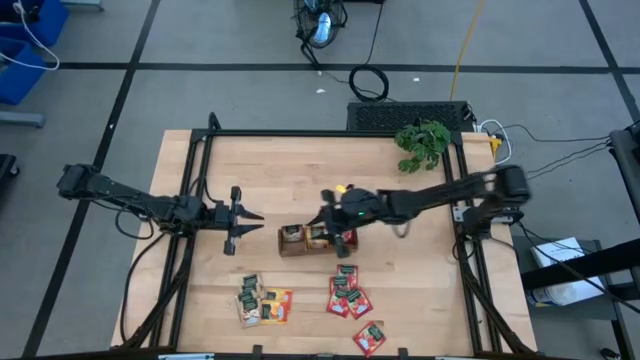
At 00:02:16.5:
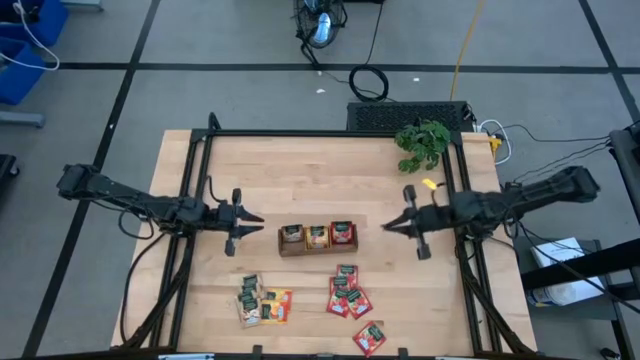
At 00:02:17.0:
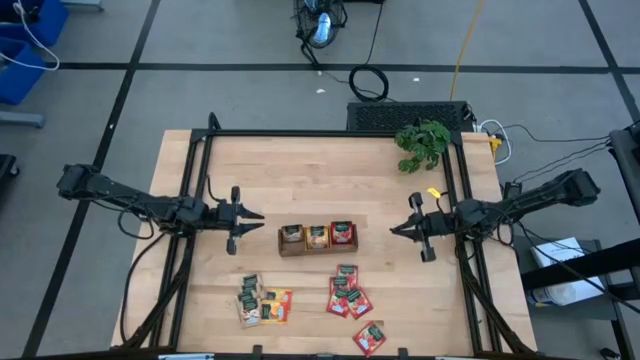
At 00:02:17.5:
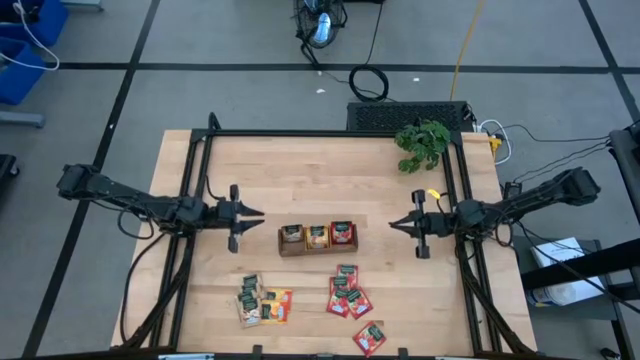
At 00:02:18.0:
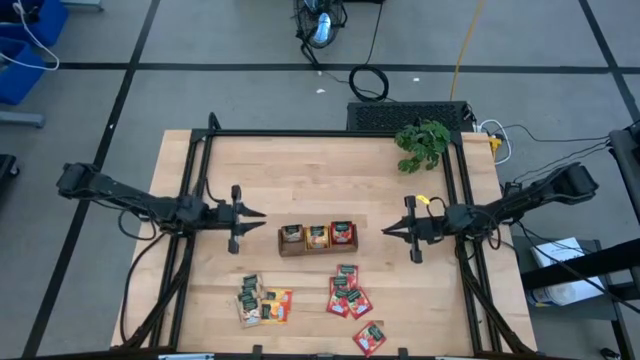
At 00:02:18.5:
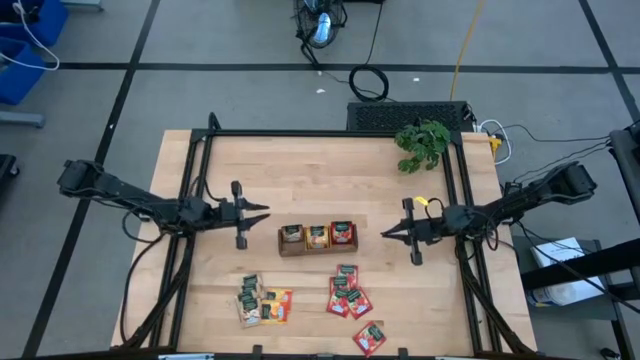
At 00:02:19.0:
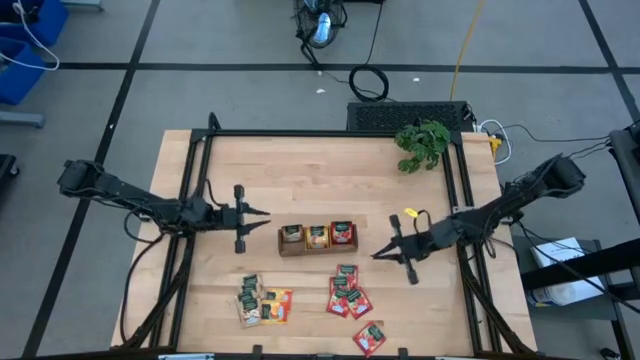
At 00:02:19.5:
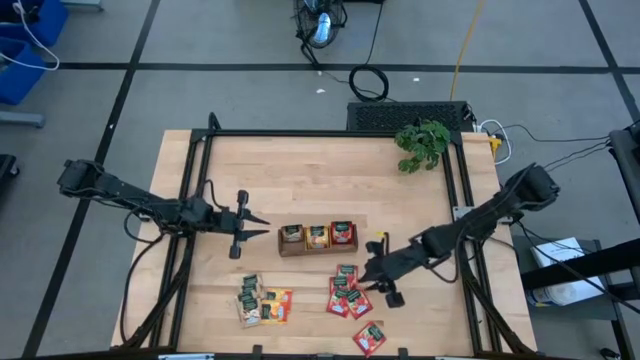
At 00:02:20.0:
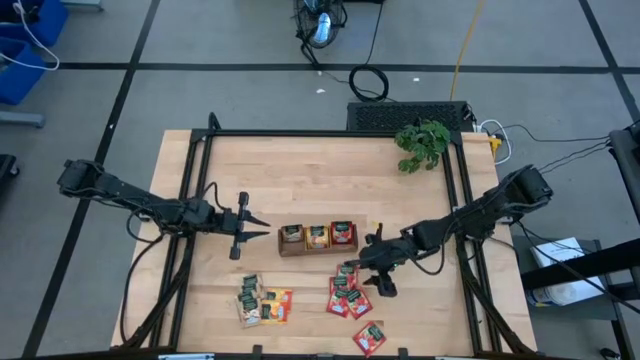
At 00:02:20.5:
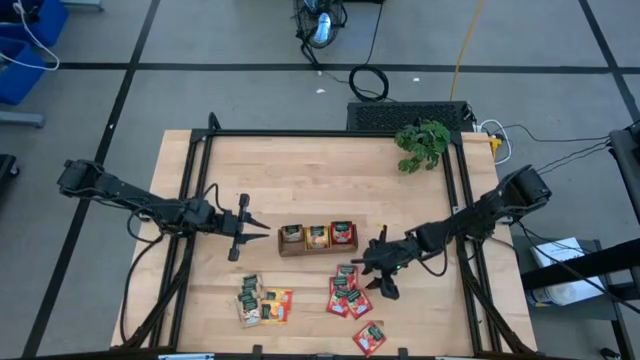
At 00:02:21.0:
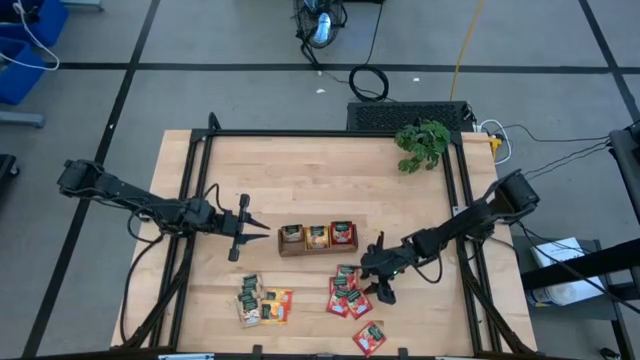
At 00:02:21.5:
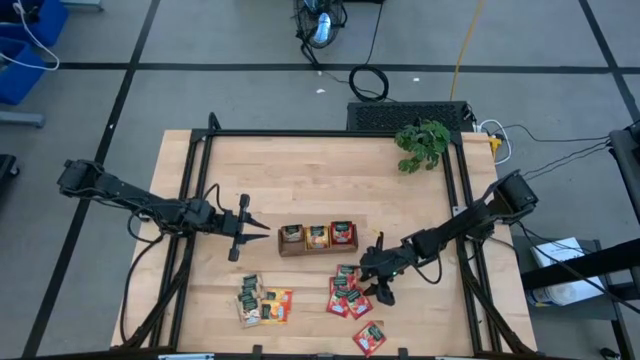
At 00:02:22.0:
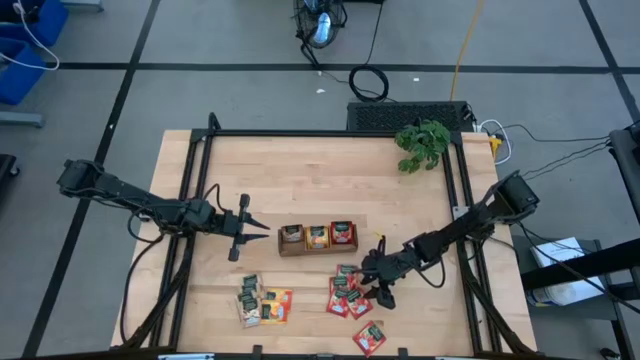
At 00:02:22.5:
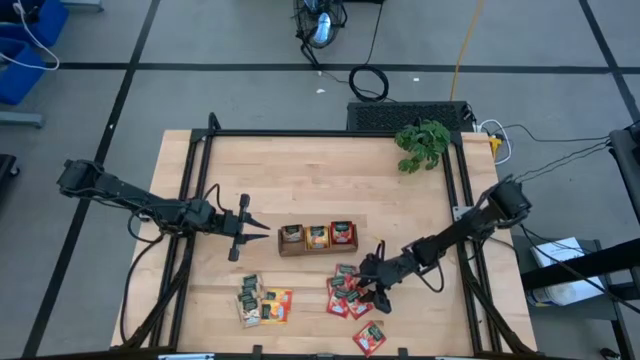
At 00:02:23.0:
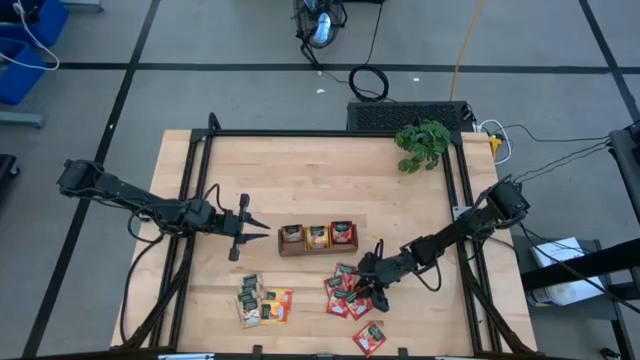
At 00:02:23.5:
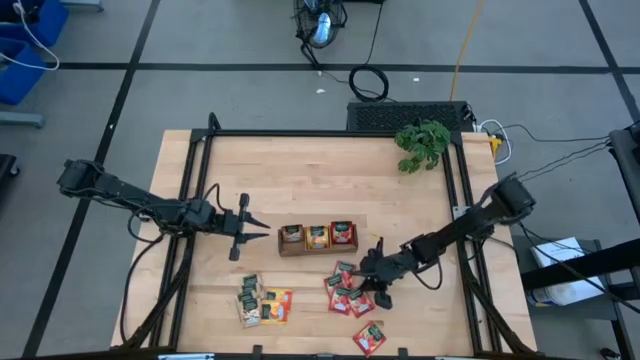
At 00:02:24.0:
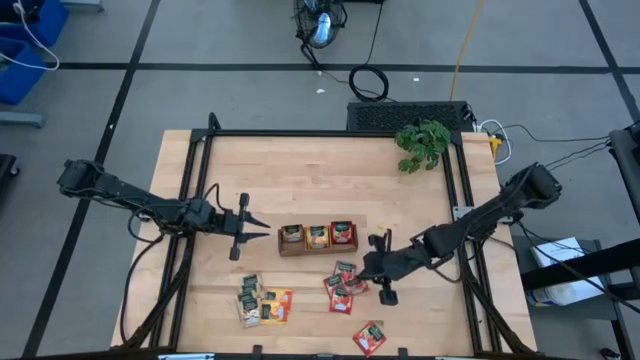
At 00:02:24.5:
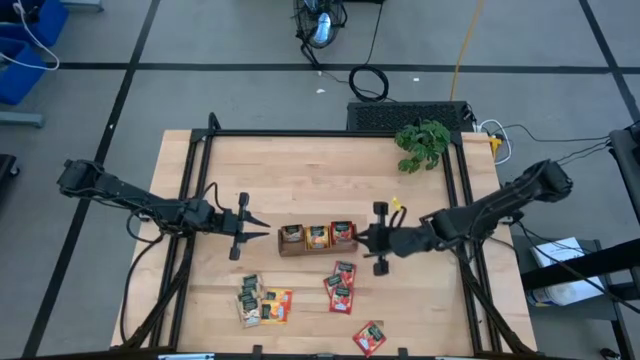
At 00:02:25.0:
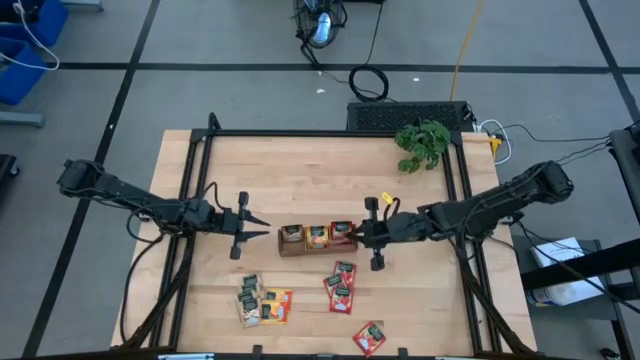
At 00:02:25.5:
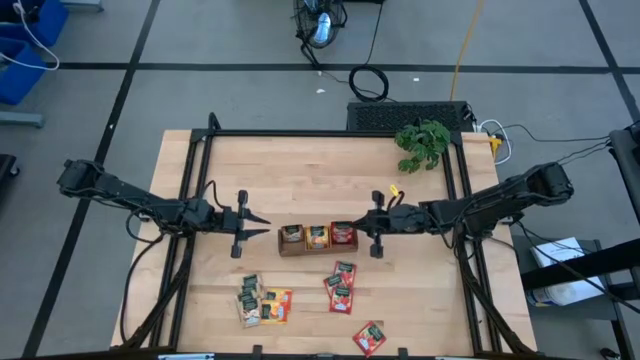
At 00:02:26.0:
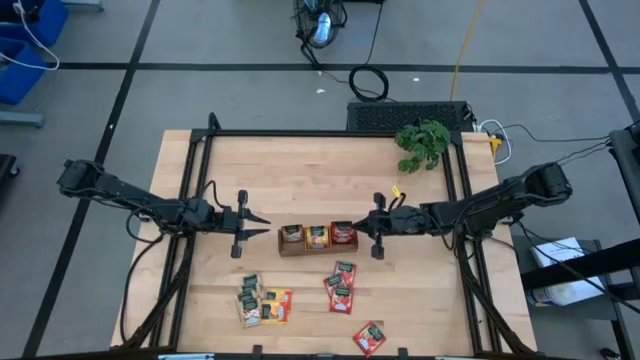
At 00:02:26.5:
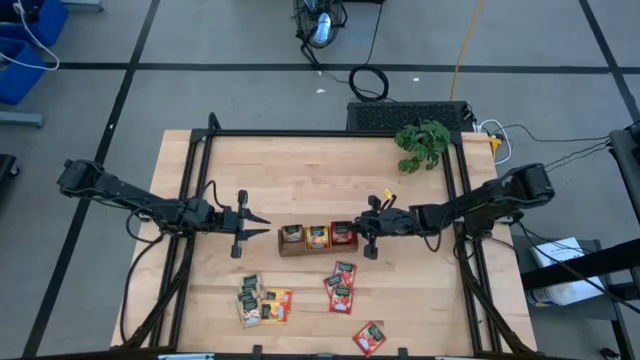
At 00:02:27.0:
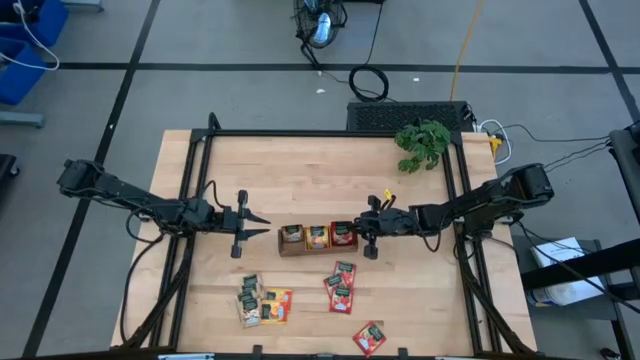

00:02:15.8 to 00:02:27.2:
Task: Pick & Place Tea
Put the red tea bag into the right section of the wooden organizer

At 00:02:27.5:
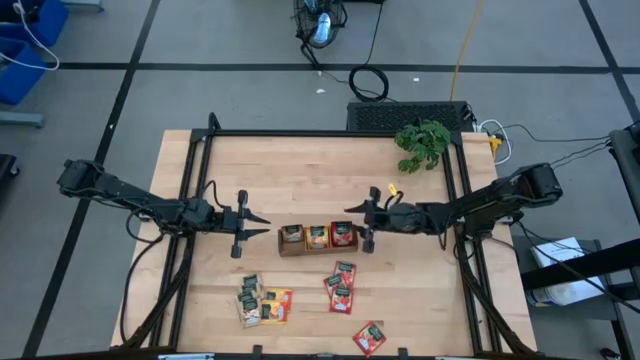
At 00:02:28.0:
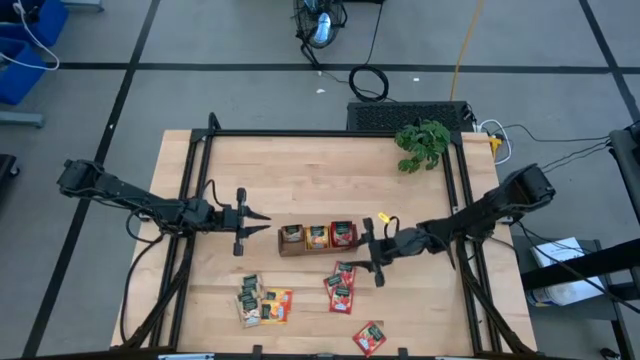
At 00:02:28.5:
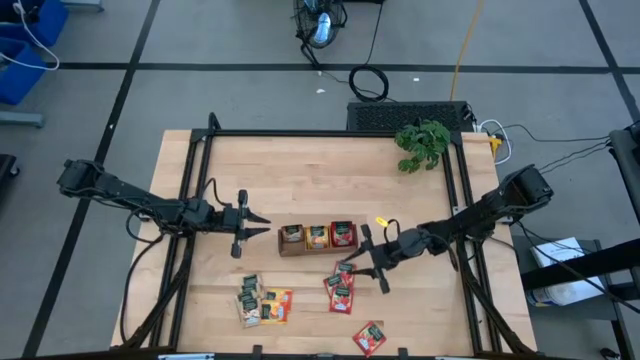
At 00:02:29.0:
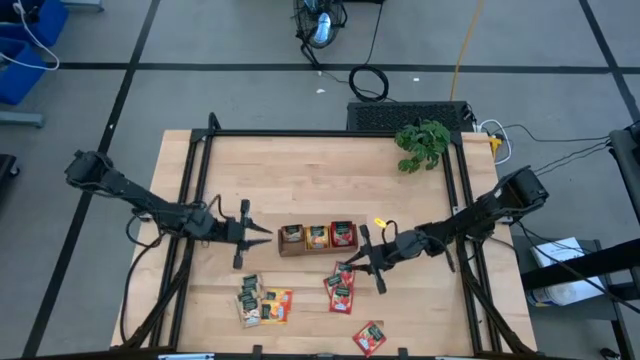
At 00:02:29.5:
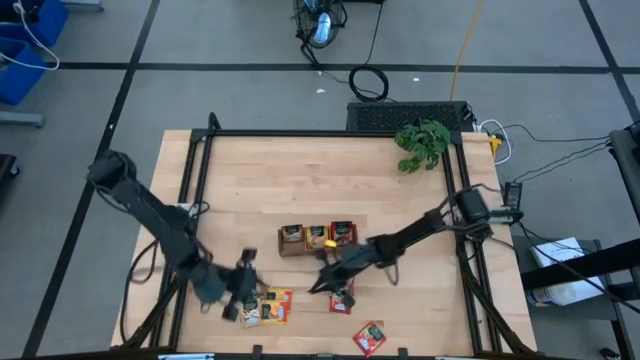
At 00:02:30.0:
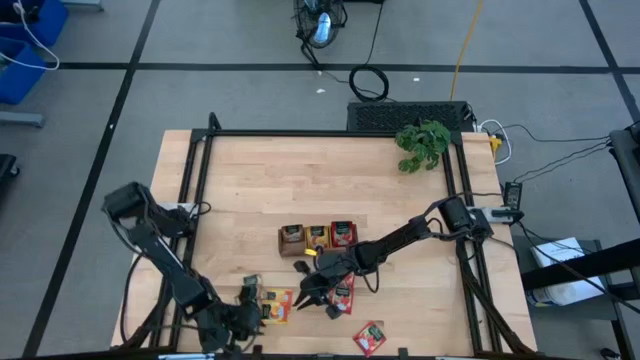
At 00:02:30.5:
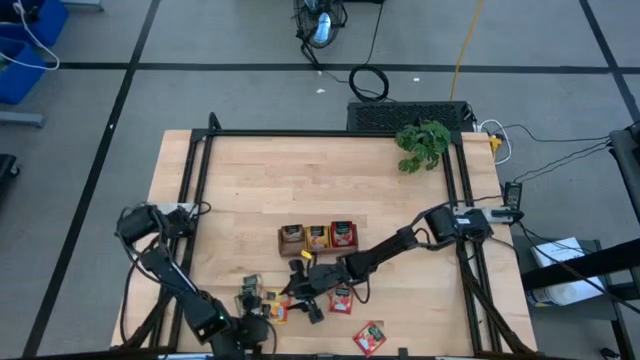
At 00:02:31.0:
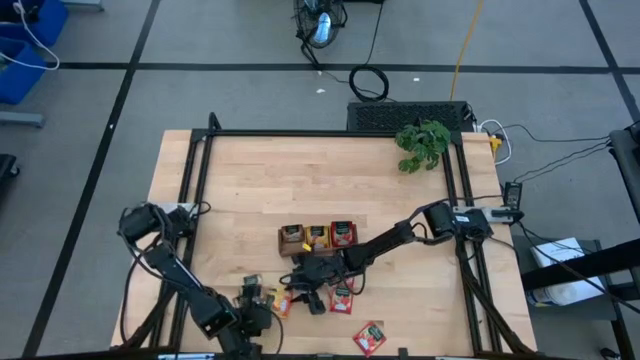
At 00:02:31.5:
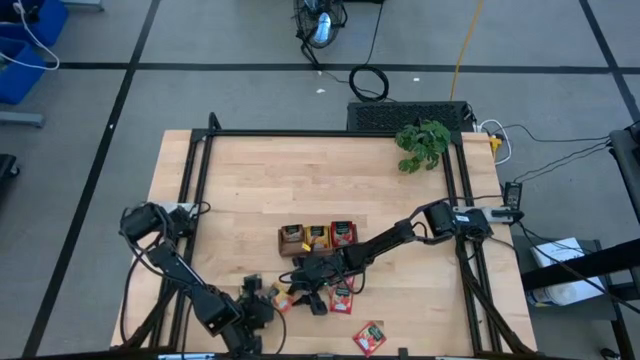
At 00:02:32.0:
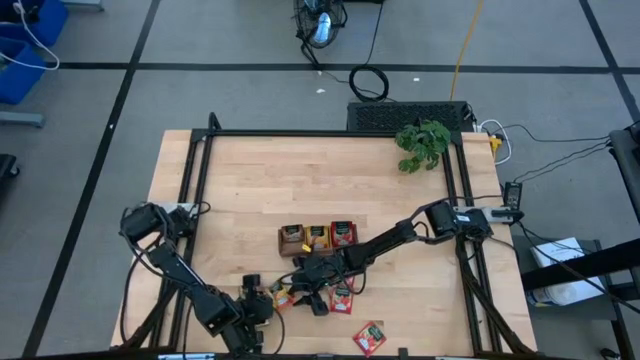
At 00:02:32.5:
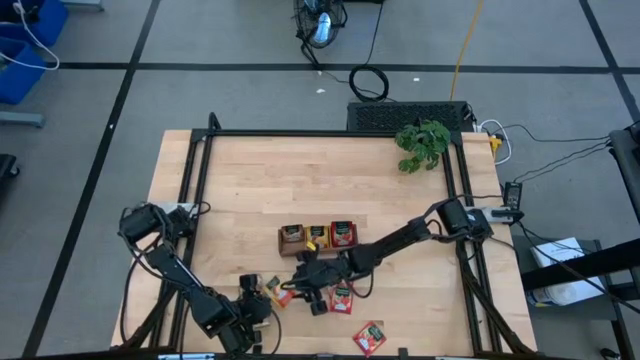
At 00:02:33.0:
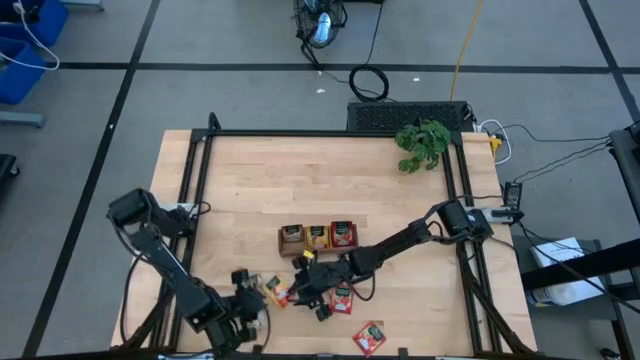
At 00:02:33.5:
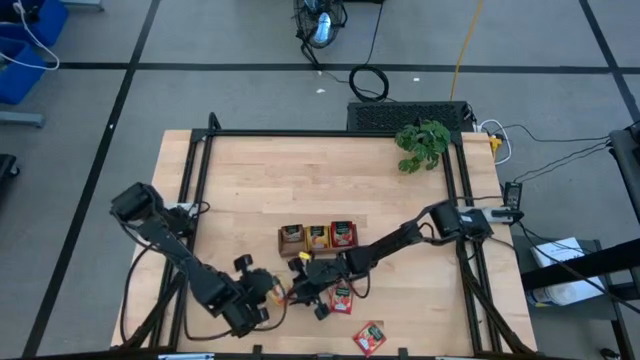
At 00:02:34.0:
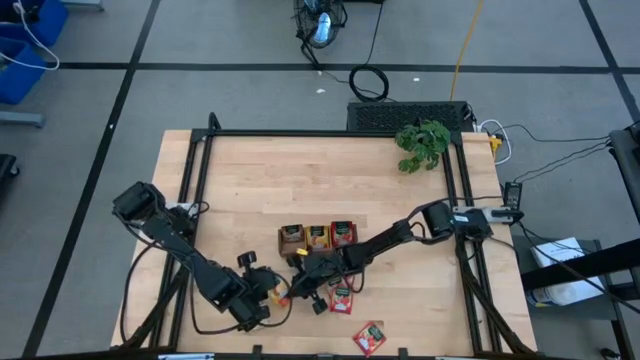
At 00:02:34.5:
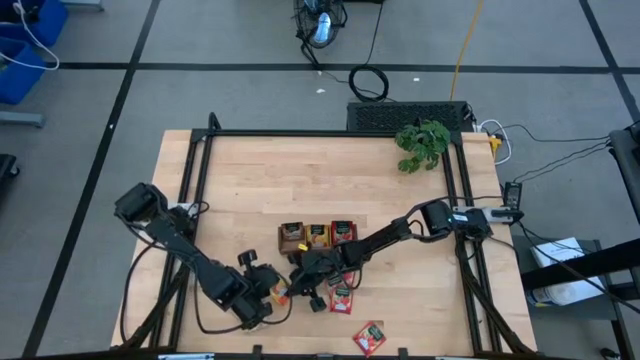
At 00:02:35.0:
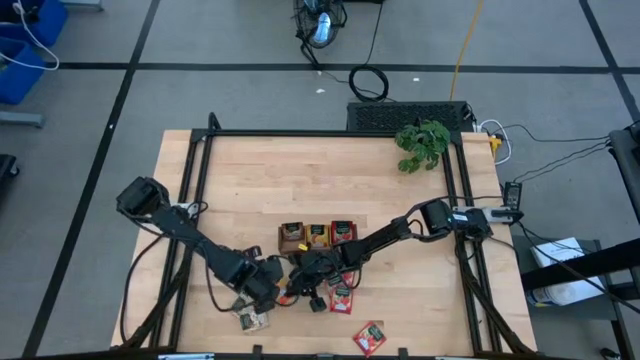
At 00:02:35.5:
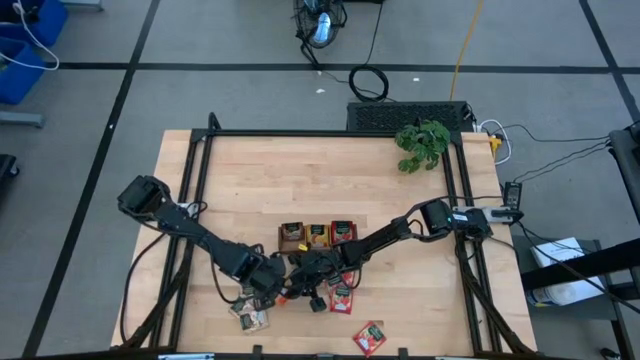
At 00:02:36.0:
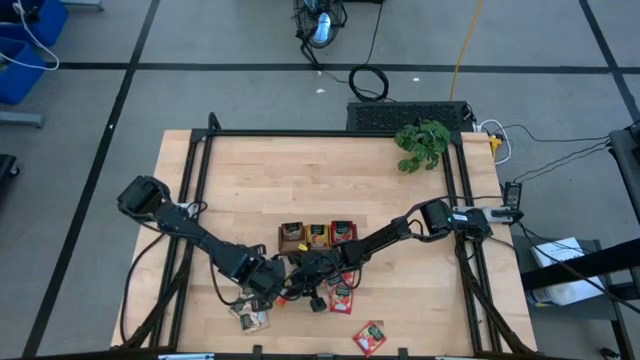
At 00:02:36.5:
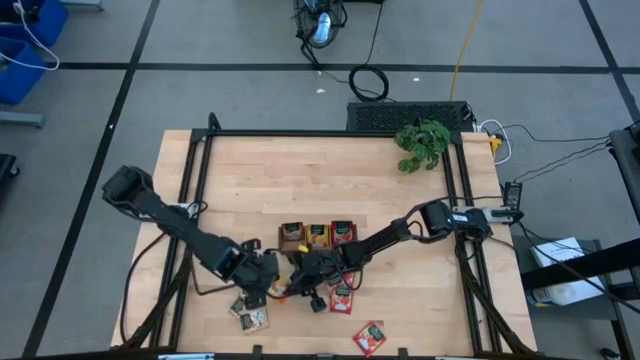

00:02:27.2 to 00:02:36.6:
Put the yellow tea bag into the middle section of the wooden organizer

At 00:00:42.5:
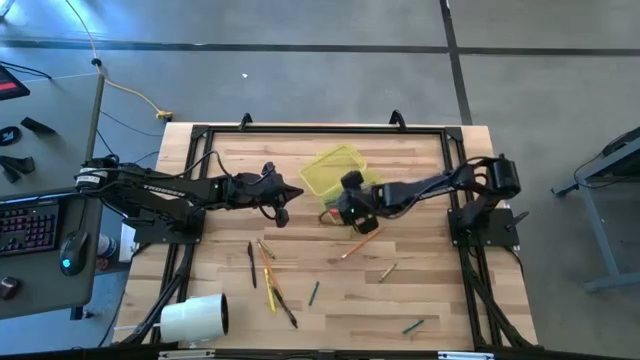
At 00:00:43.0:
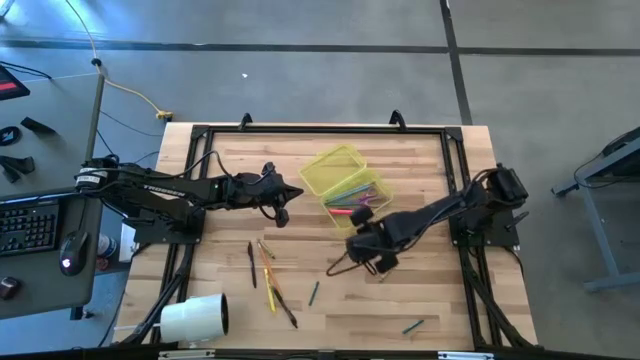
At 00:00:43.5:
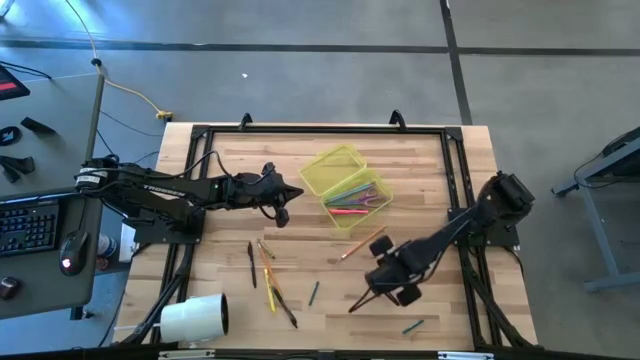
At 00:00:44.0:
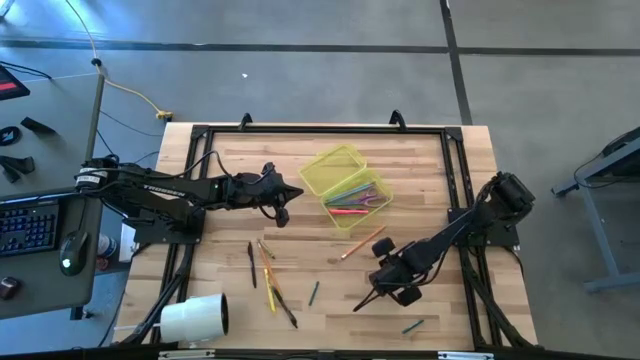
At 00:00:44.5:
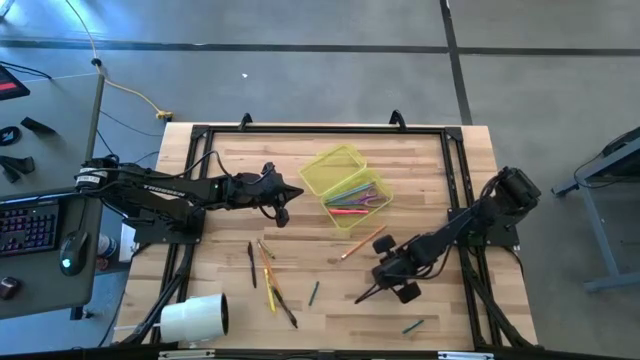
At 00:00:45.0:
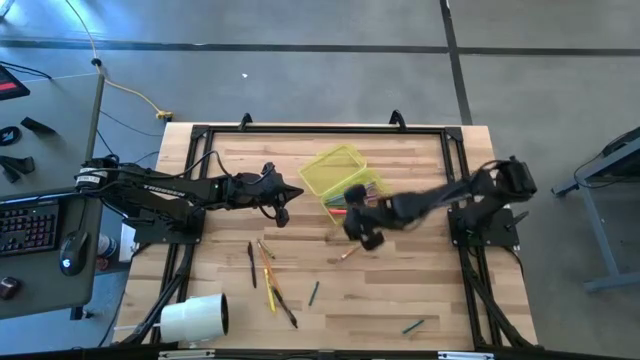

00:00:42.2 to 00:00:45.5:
Task: Pick & place school supplies into a supply box
Put the right green crayon into the supply box
